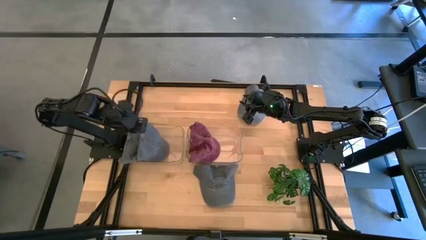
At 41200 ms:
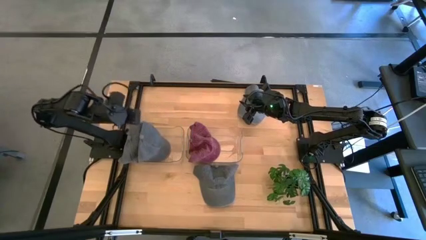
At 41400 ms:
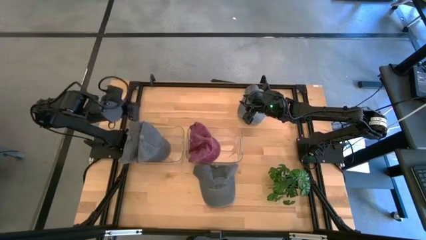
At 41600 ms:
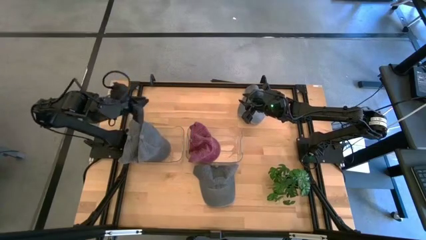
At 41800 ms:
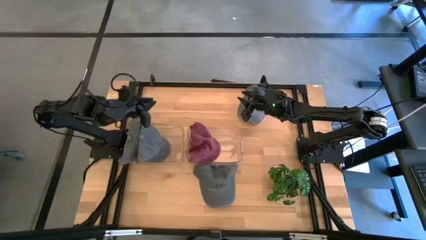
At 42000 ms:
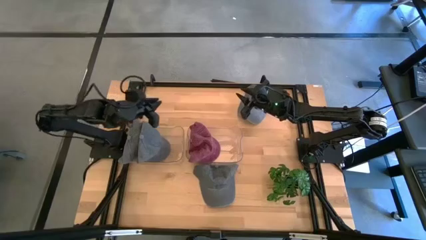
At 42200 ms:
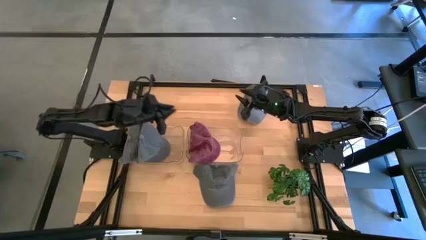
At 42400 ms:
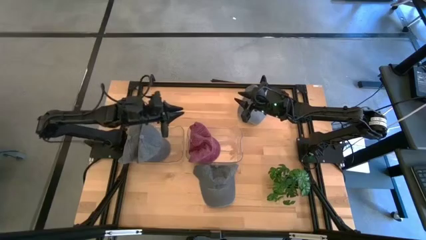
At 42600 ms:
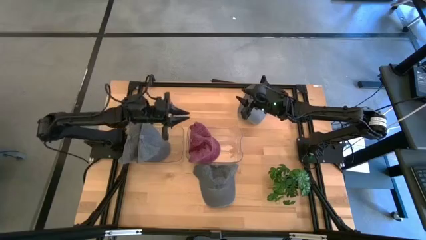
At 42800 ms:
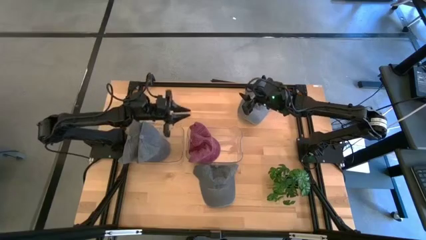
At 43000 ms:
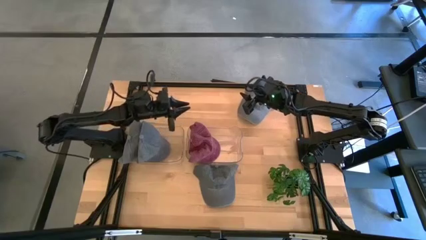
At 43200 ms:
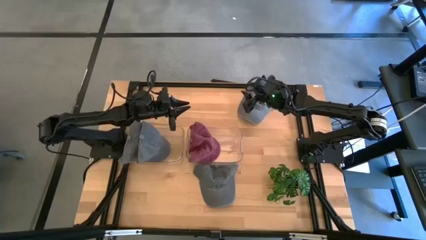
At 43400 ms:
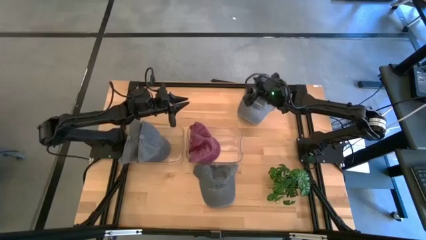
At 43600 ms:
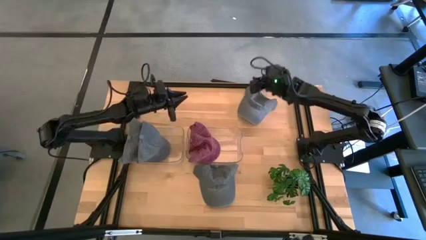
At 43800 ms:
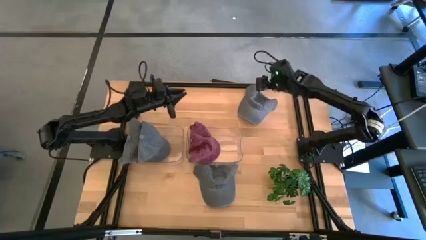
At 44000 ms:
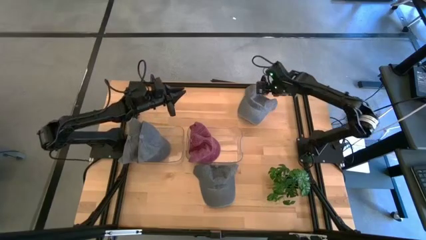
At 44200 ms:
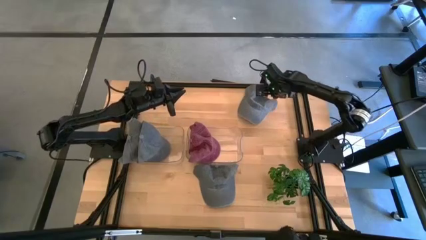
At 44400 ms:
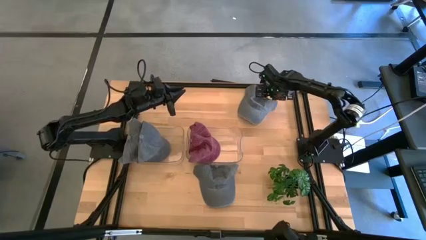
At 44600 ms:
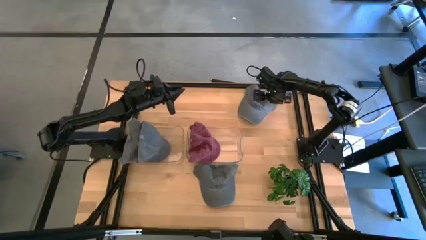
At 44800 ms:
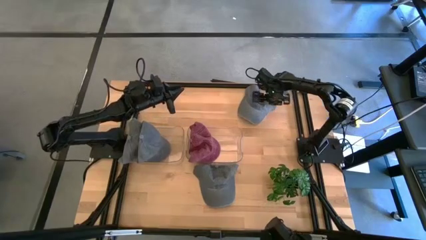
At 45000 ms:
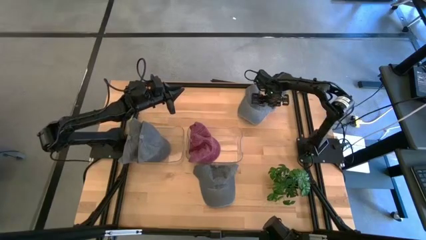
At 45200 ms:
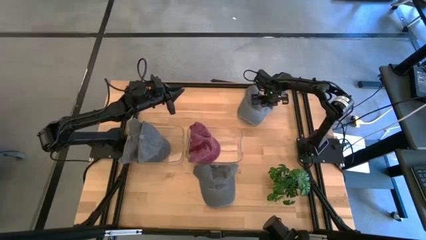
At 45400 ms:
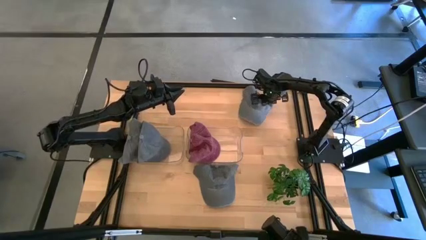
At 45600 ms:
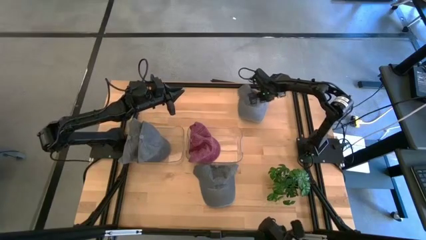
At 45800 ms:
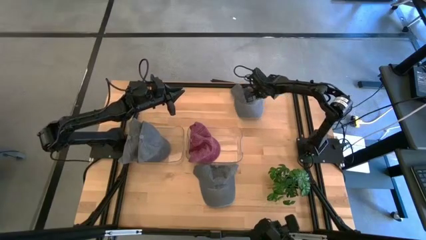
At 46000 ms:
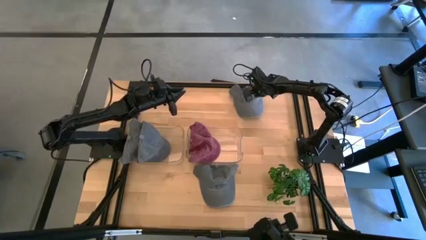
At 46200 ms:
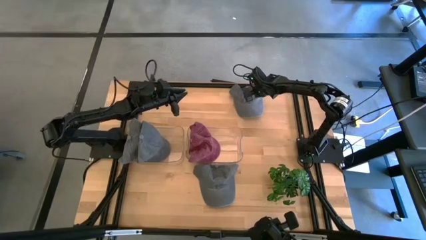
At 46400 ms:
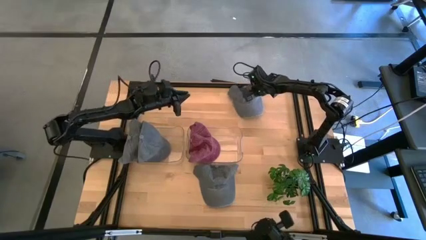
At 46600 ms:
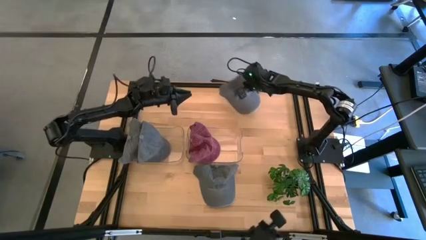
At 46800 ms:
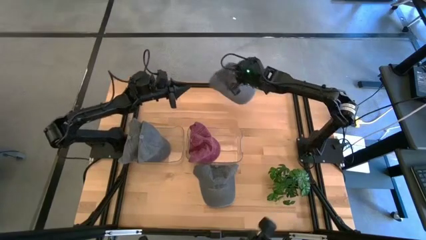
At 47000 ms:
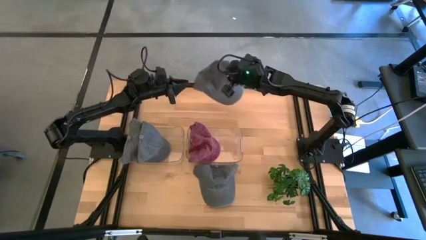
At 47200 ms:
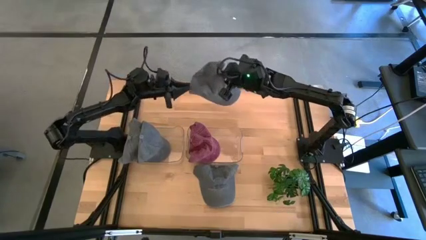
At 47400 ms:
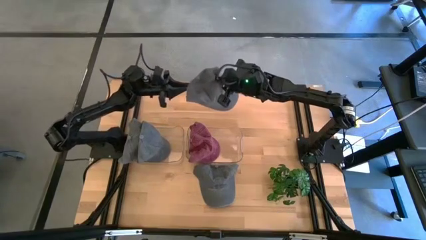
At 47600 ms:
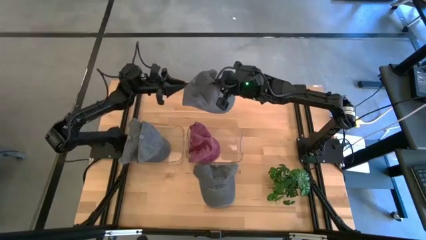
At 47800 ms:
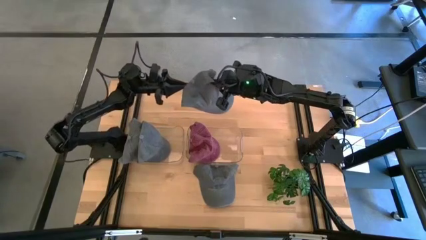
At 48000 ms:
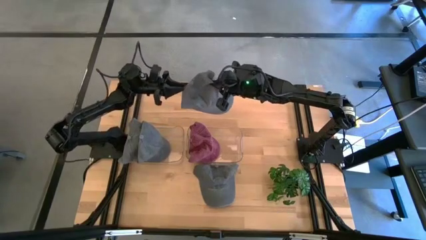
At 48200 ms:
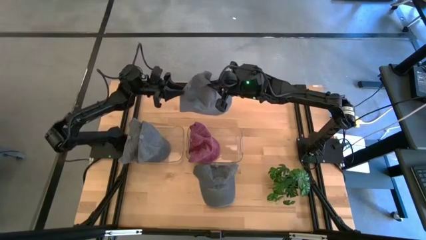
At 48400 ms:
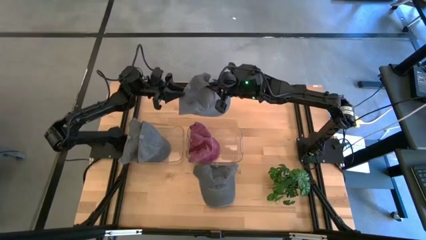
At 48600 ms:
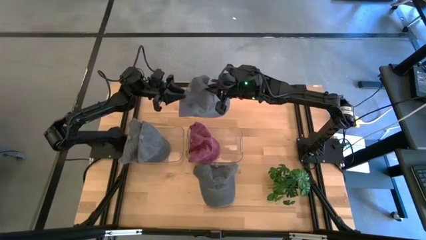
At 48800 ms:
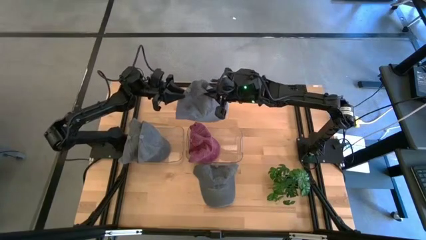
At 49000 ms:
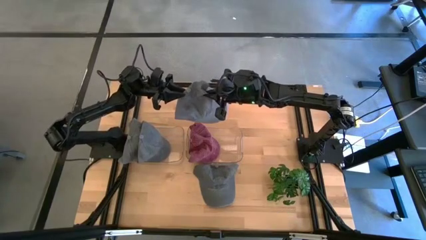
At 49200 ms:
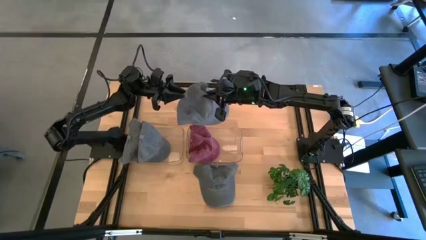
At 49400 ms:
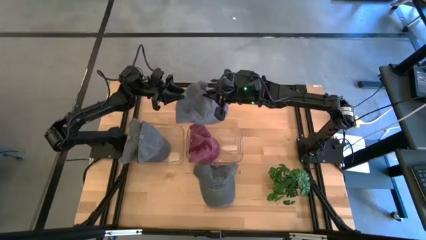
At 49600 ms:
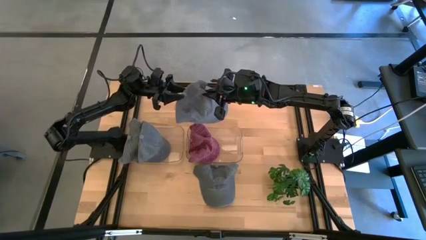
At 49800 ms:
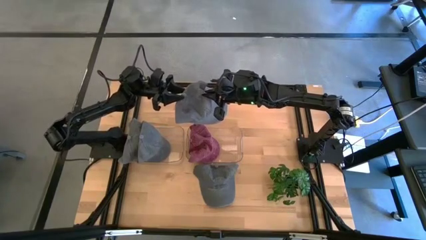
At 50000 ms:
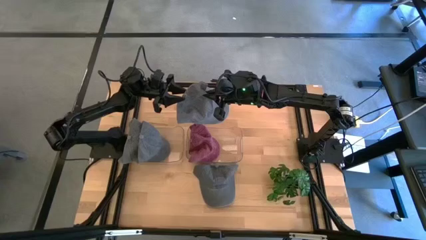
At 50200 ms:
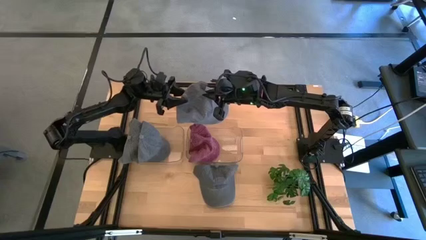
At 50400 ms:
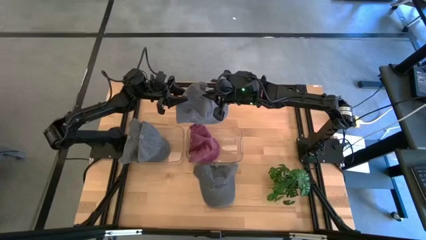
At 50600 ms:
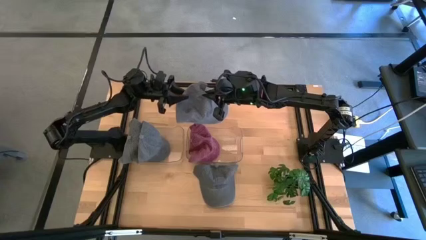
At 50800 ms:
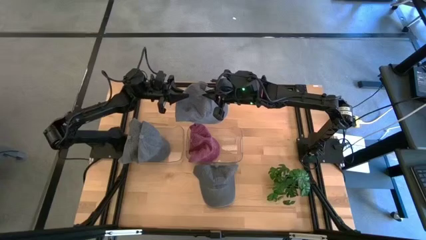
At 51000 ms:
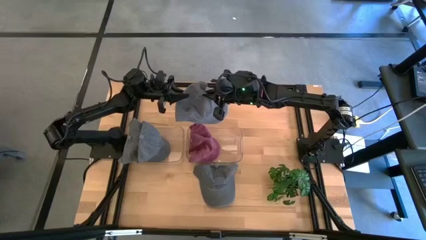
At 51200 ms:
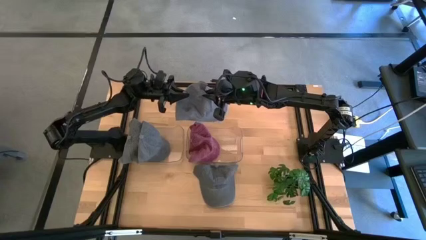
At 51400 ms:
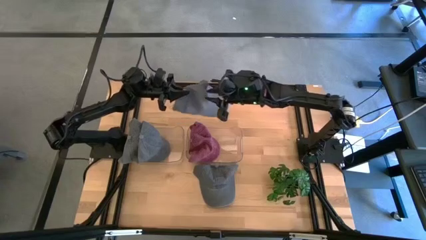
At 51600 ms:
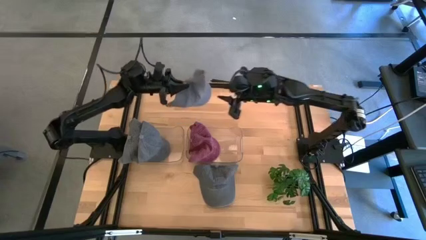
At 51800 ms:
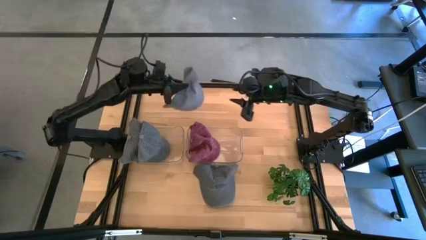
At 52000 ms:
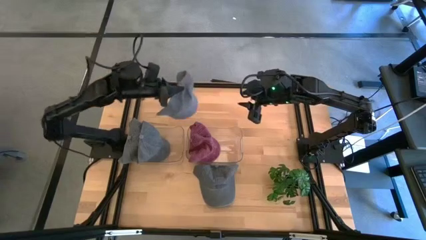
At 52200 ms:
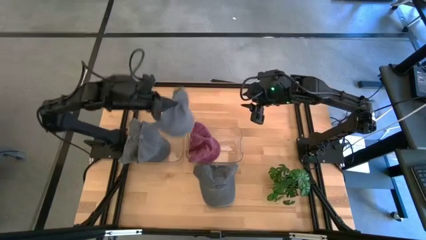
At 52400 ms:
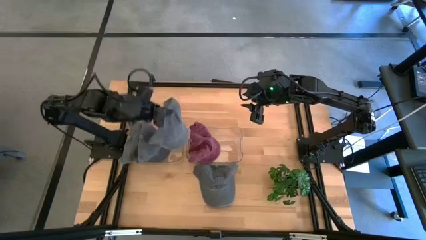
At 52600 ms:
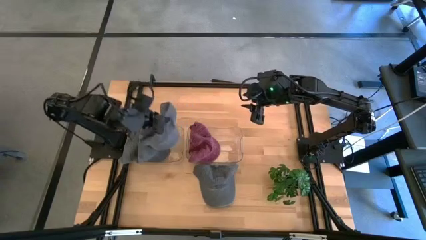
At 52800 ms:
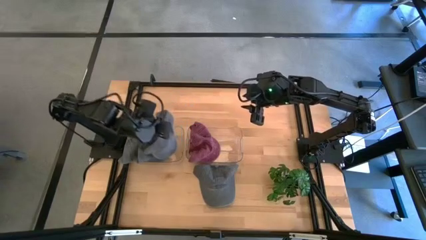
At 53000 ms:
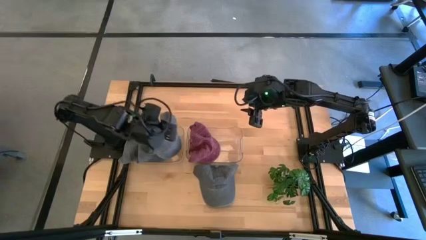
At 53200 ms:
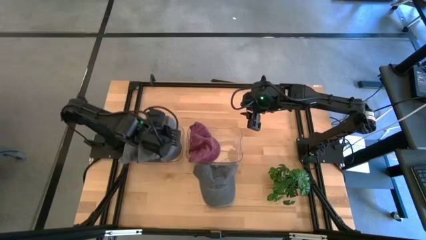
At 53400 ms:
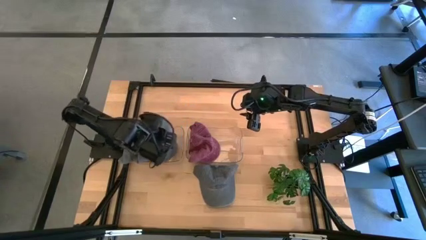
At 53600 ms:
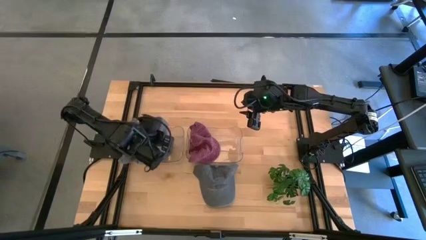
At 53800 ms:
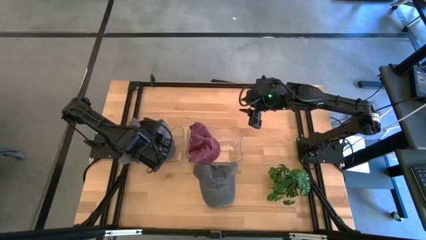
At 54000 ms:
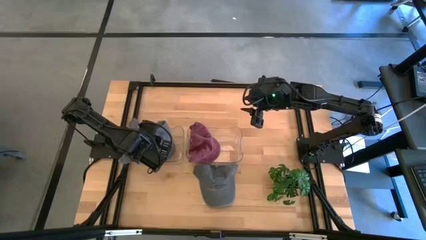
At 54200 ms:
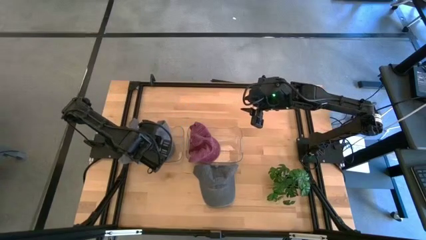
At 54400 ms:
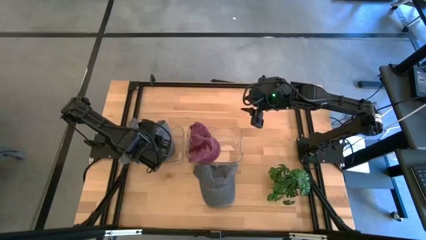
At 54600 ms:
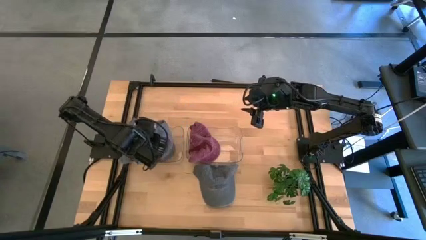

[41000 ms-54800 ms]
Task: Pick & Place hat
Put the top dark blue cap into the left transparent bin
